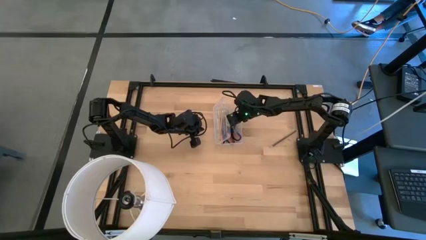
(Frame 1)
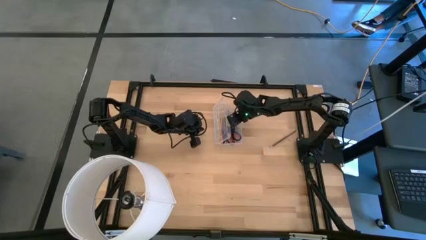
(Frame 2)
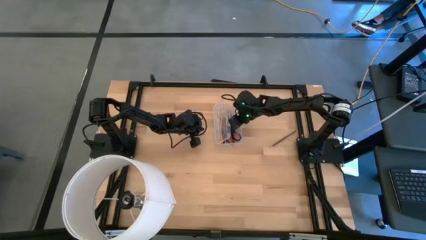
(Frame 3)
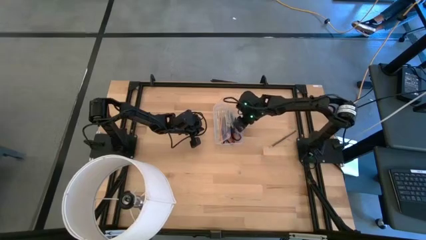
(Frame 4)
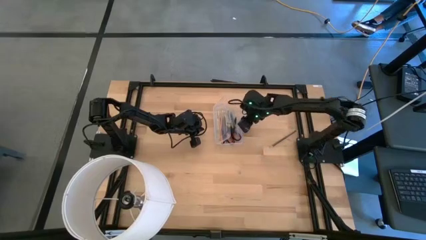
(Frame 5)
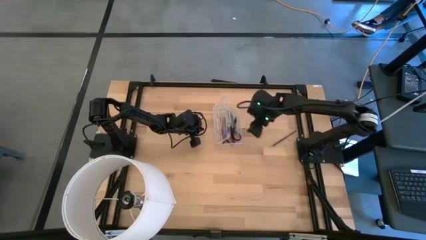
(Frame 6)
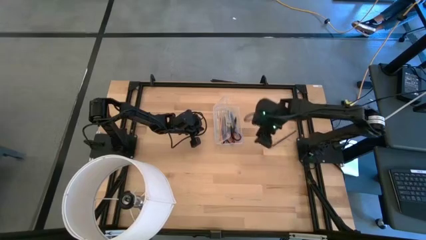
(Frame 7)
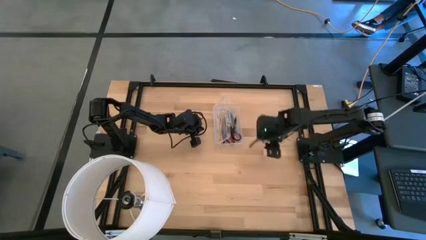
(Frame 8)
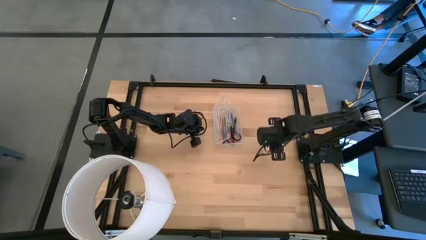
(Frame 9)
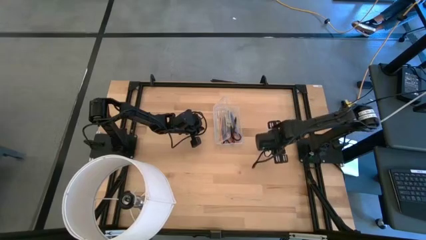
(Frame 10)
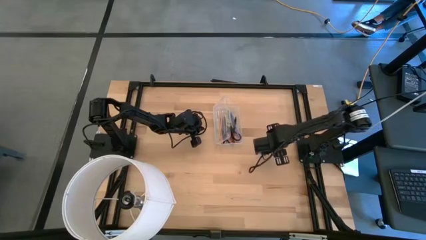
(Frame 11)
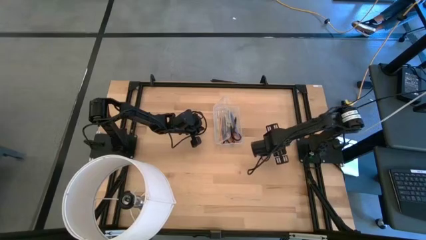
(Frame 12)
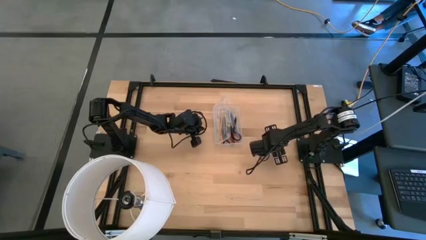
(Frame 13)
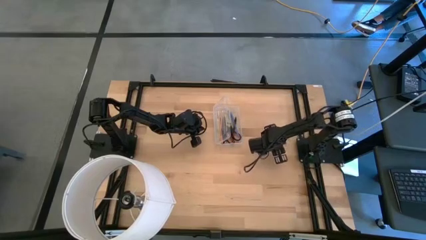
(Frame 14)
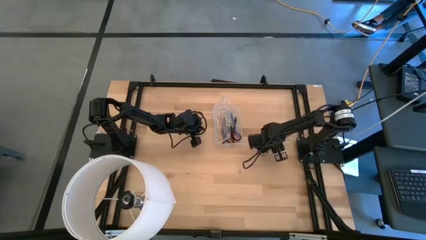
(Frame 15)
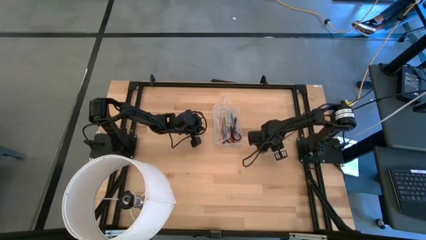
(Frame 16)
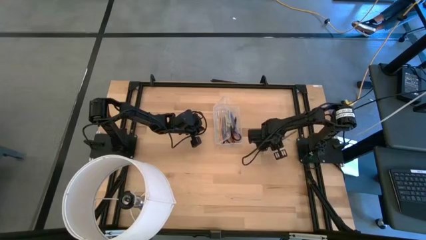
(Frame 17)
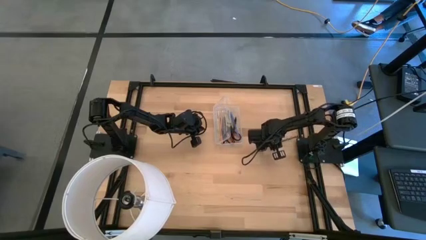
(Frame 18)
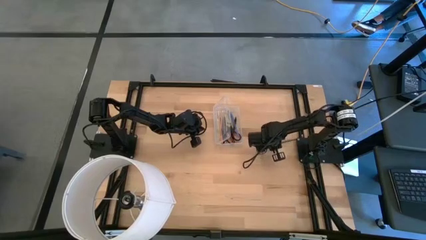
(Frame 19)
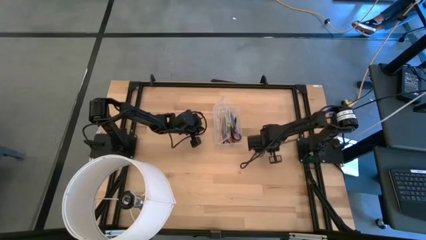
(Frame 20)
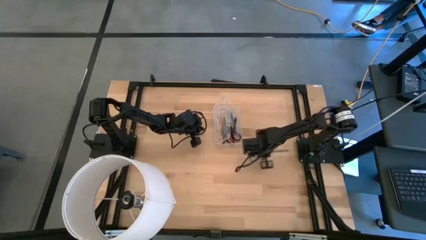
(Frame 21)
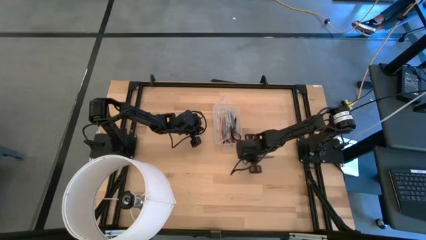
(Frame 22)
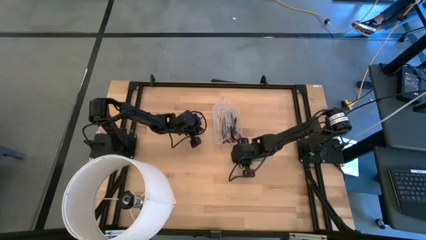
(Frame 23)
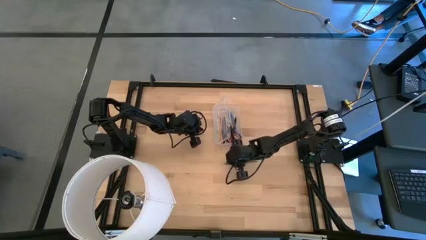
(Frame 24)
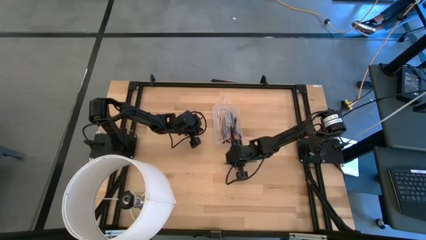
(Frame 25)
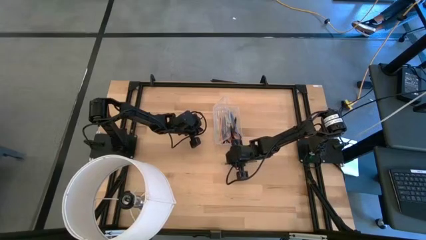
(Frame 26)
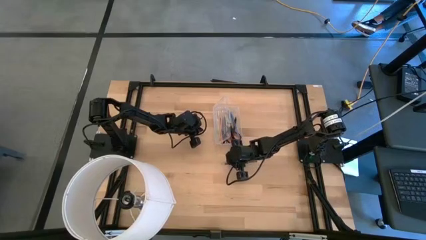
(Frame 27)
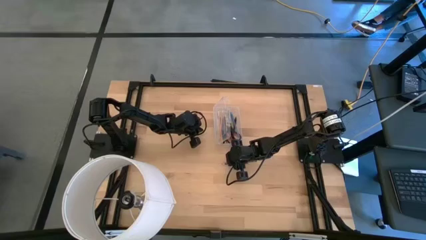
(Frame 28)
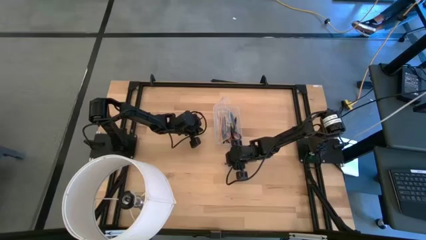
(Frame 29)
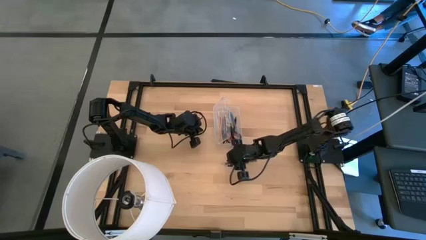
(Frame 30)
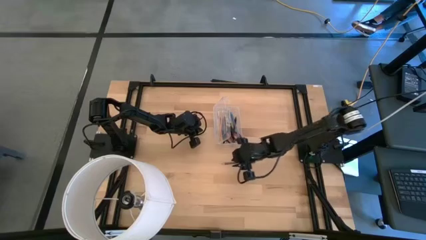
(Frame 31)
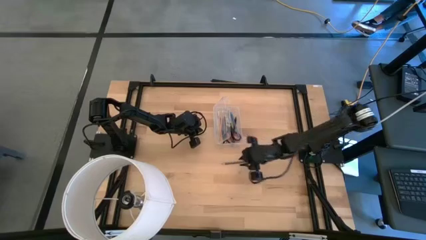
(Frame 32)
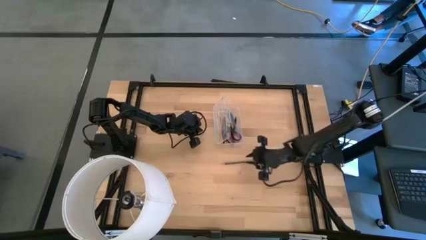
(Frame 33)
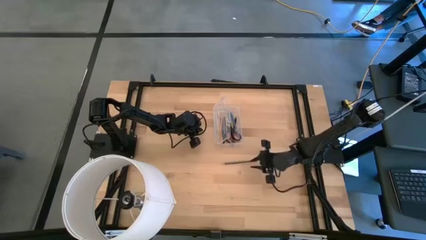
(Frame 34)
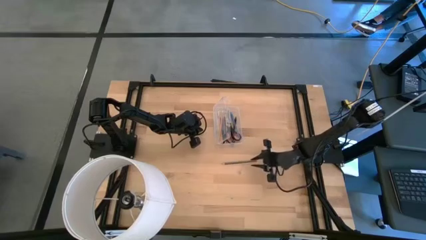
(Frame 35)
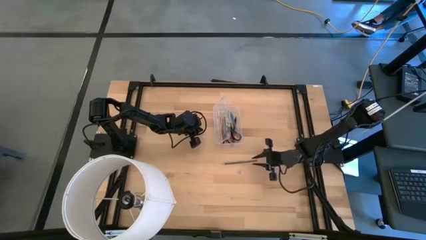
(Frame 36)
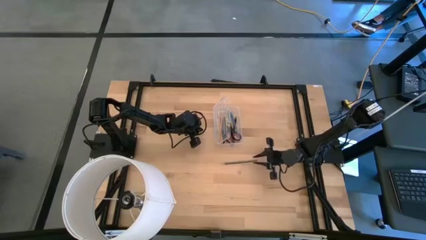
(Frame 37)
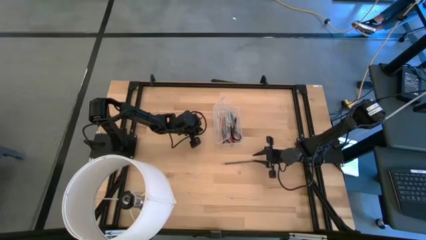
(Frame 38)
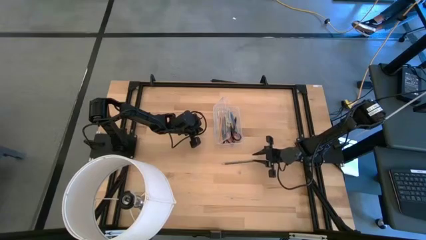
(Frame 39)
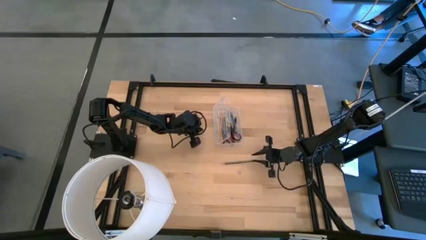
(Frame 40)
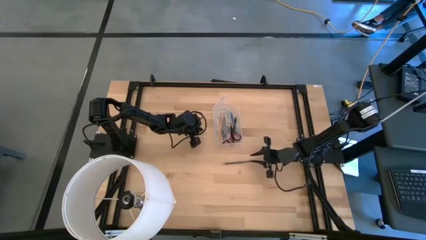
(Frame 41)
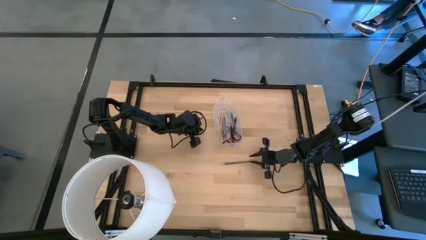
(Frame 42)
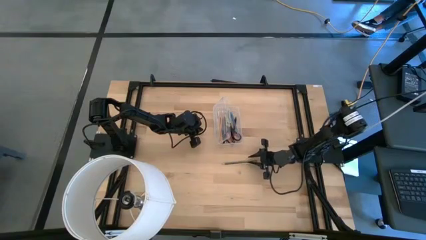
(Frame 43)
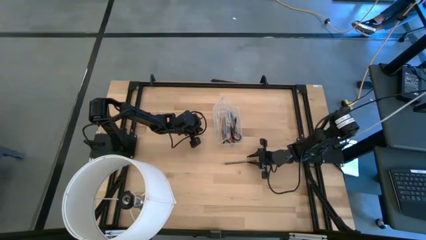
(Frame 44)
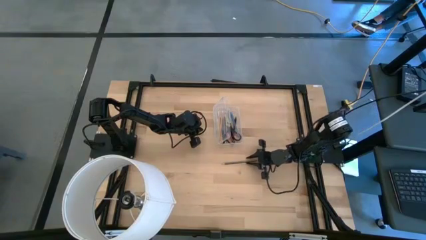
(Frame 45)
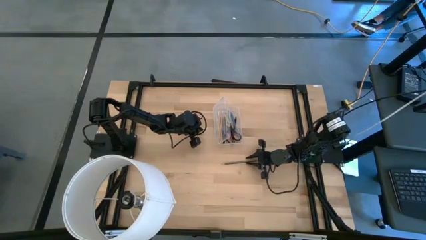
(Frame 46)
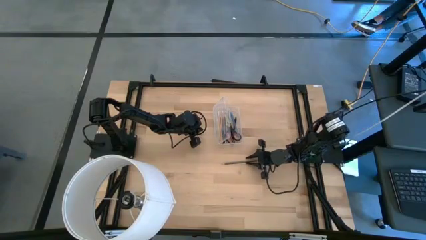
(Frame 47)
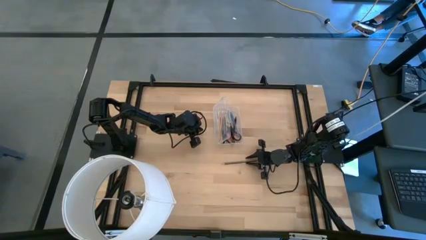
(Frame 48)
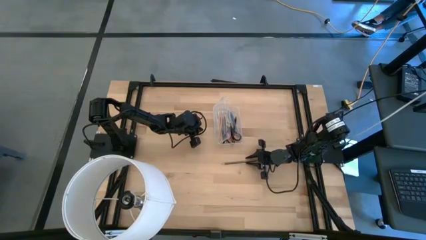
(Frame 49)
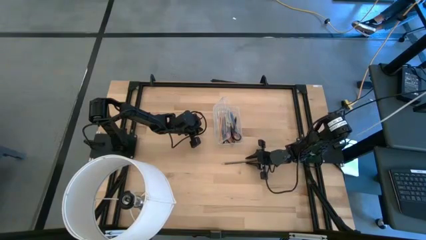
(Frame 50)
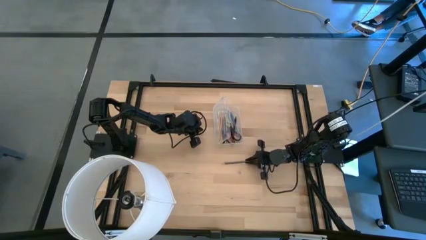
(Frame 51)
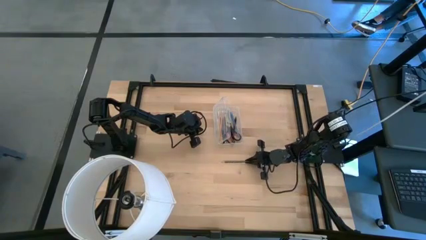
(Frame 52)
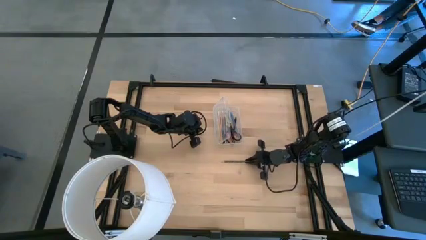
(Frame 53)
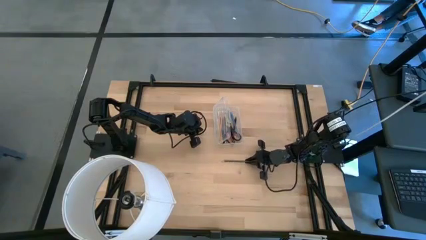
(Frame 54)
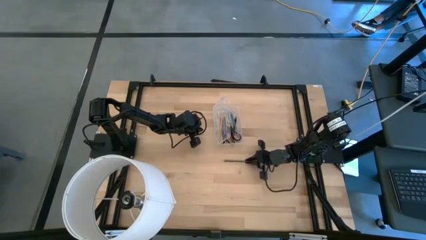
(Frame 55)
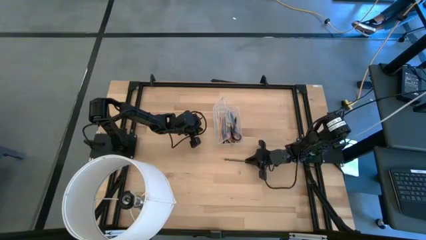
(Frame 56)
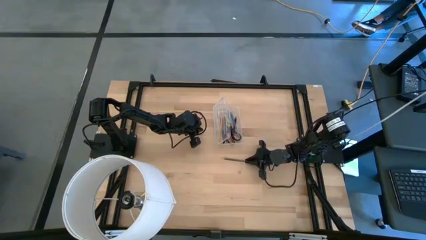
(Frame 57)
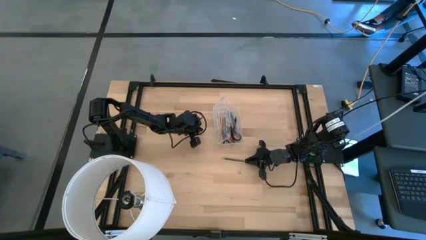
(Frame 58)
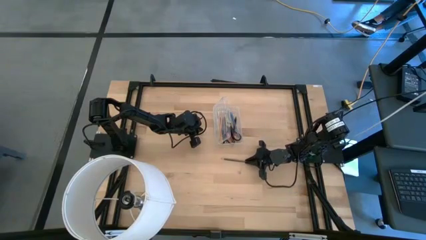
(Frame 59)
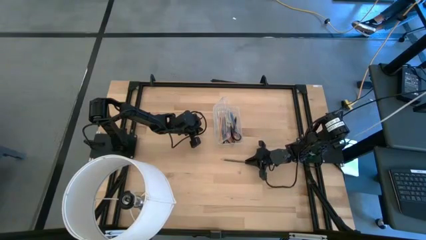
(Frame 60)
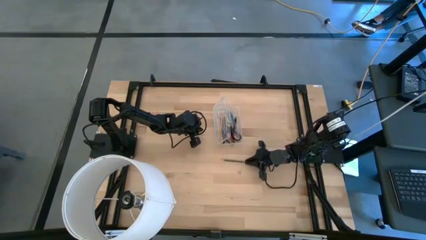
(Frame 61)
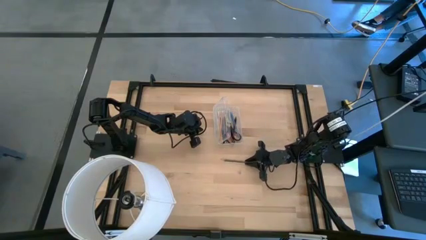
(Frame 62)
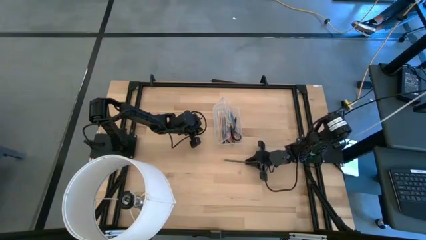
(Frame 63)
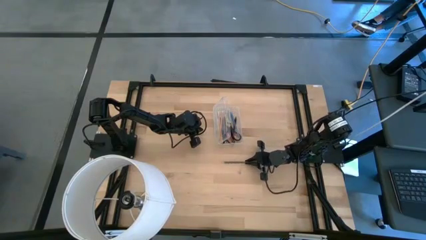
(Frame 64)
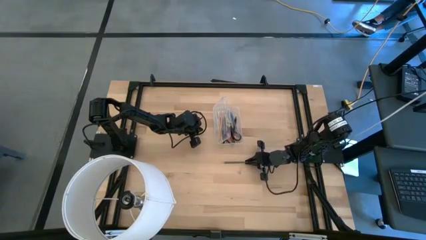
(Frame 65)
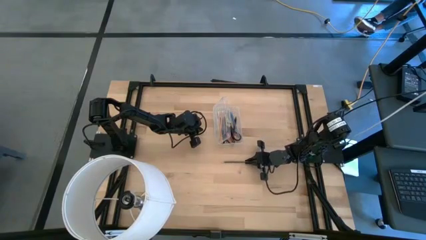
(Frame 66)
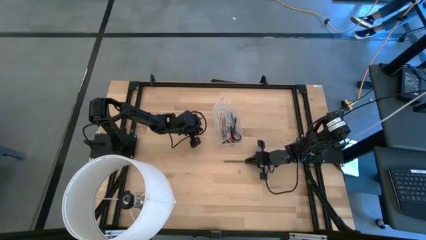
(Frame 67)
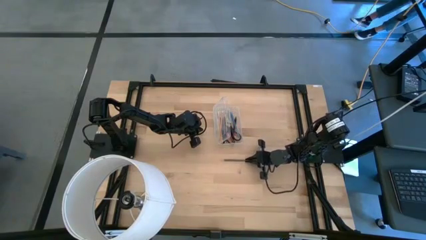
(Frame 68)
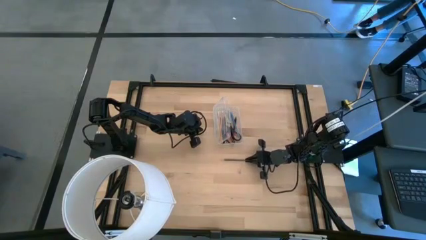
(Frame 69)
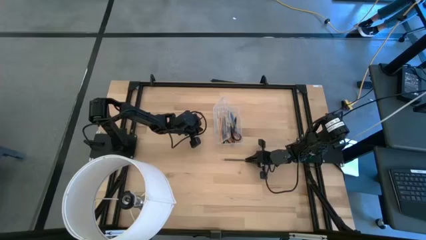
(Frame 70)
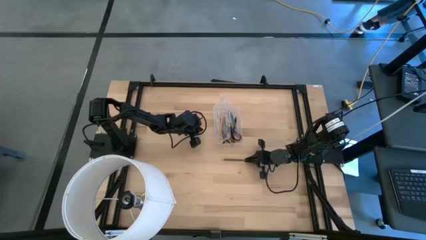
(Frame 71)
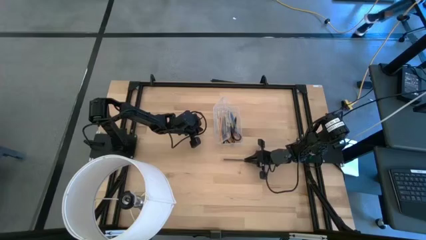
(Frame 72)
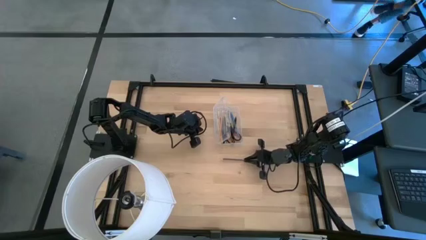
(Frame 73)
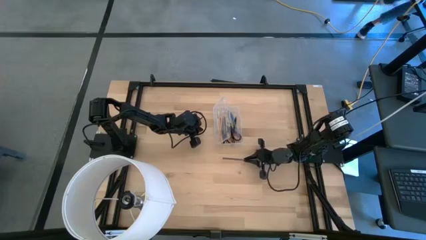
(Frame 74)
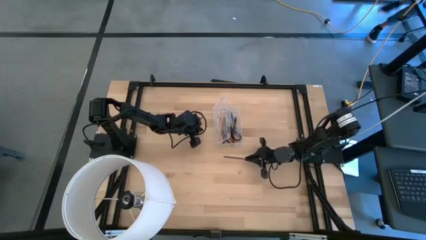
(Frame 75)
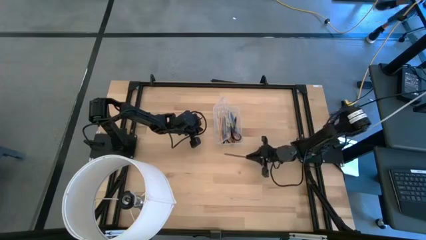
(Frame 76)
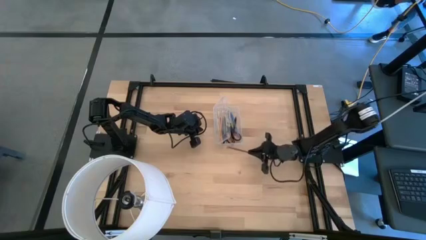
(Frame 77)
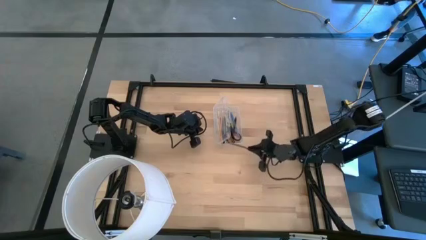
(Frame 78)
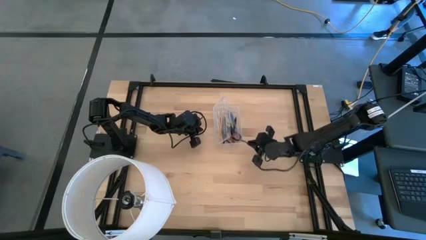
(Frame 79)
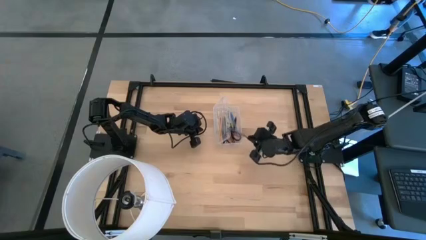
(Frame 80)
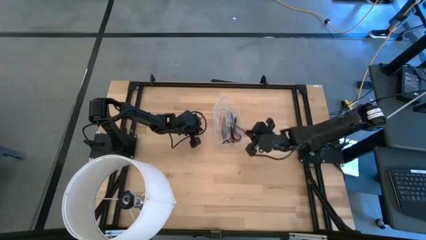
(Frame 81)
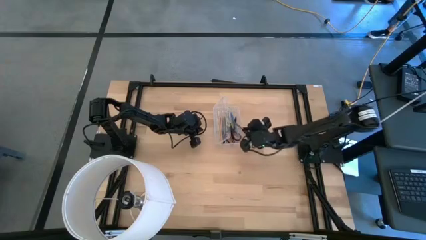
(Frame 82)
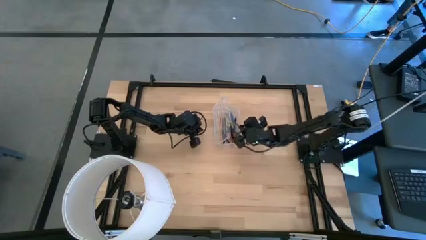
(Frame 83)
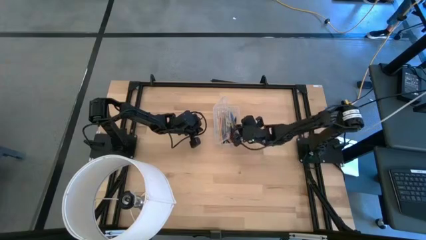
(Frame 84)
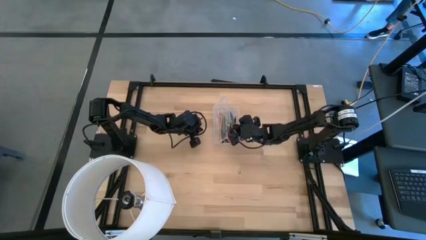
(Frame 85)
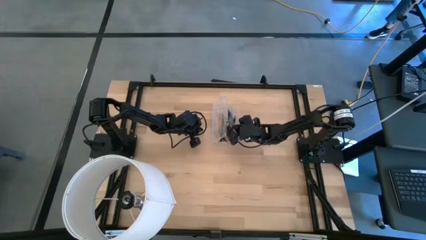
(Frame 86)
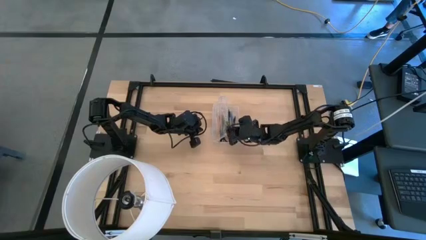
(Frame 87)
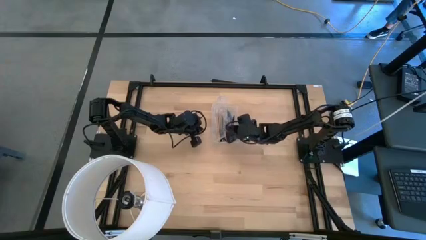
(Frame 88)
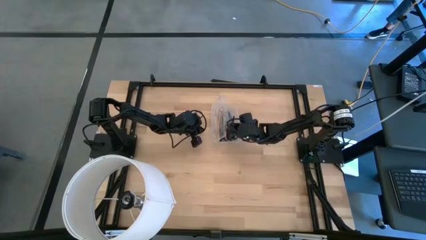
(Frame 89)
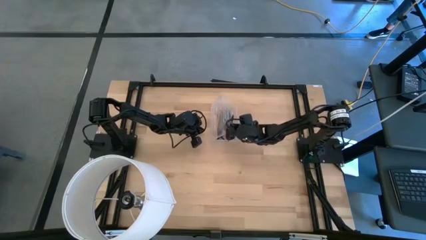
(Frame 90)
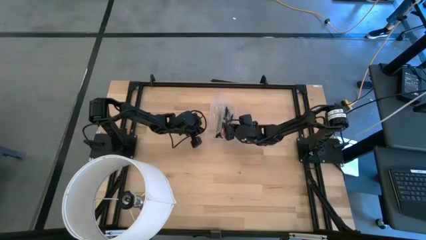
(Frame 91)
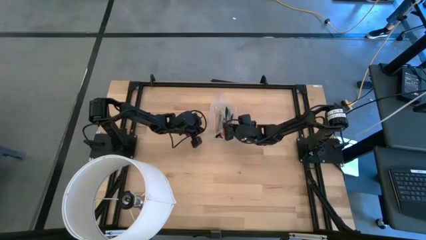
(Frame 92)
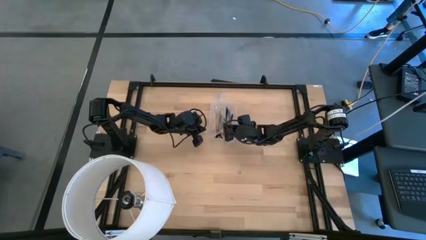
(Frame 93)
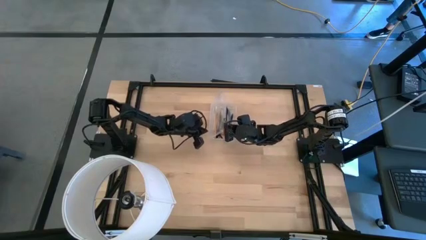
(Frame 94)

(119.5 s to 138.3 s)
Task: Pick & place school supplies into a supply box
Put the black pencil into the transparent supply box
